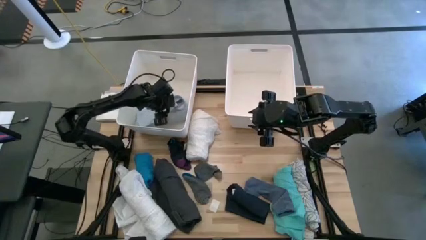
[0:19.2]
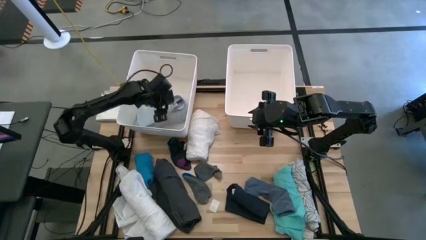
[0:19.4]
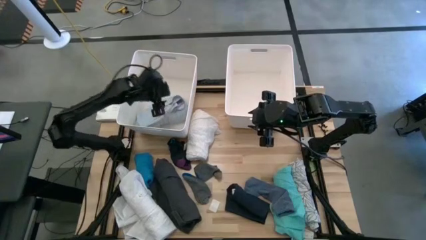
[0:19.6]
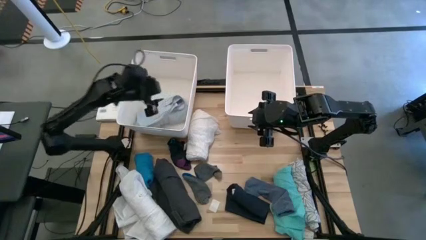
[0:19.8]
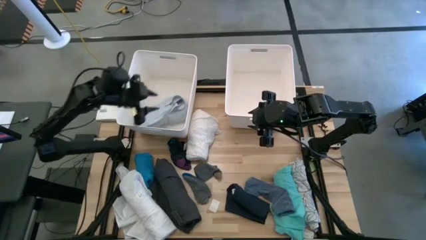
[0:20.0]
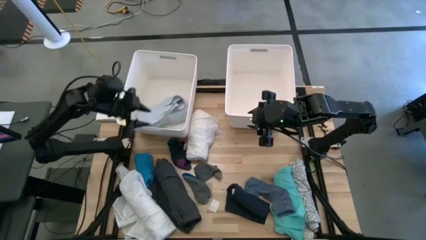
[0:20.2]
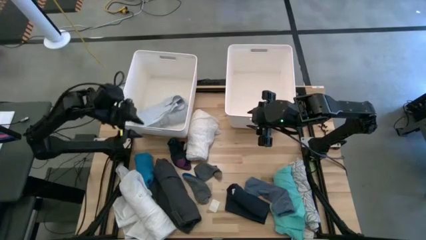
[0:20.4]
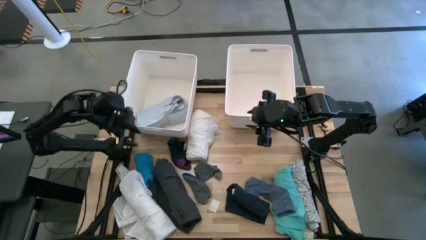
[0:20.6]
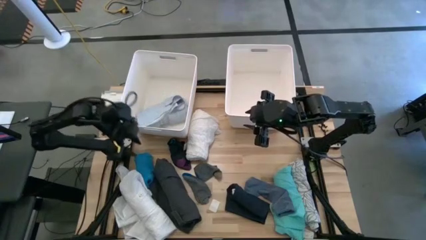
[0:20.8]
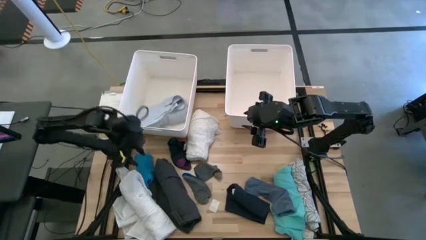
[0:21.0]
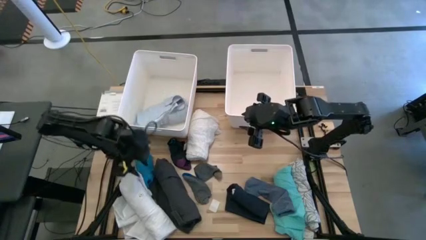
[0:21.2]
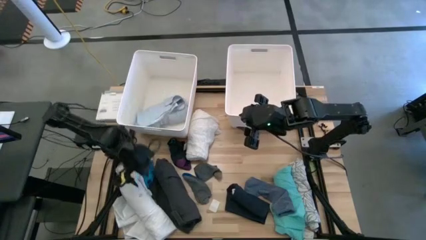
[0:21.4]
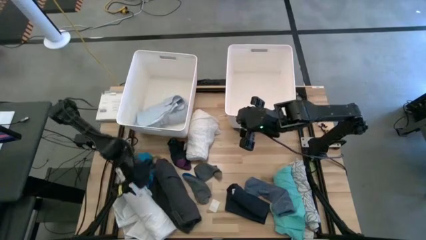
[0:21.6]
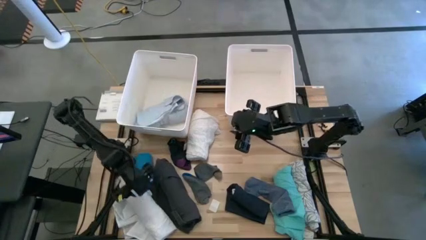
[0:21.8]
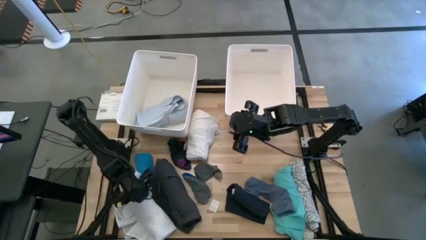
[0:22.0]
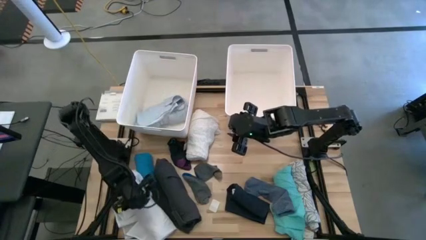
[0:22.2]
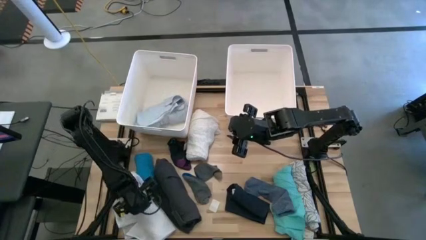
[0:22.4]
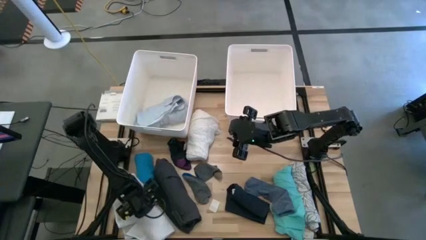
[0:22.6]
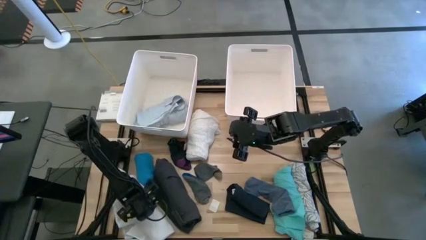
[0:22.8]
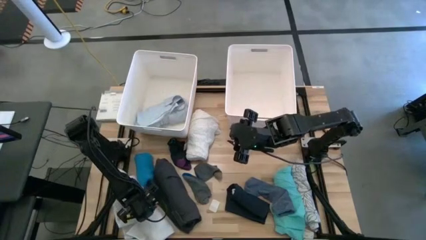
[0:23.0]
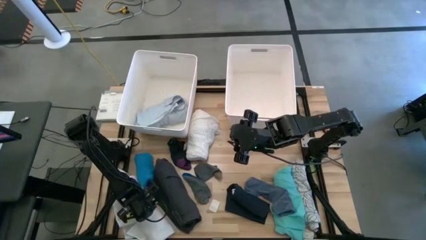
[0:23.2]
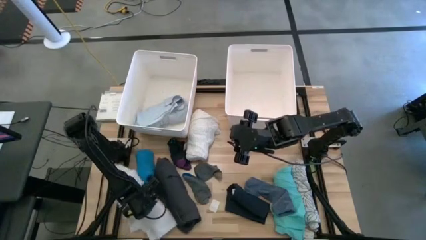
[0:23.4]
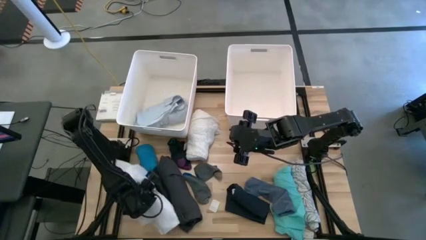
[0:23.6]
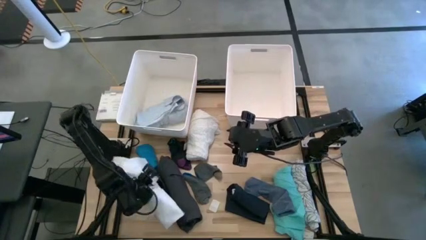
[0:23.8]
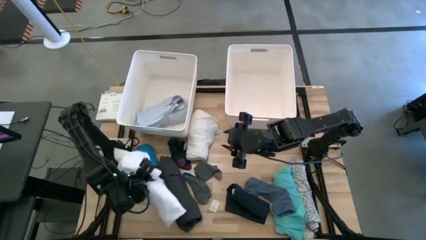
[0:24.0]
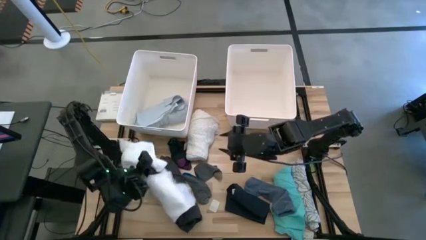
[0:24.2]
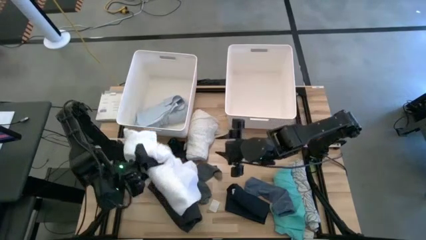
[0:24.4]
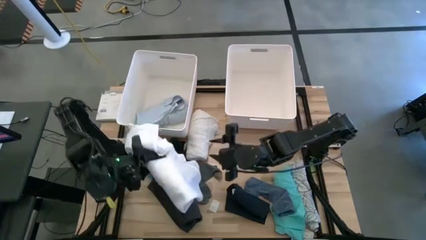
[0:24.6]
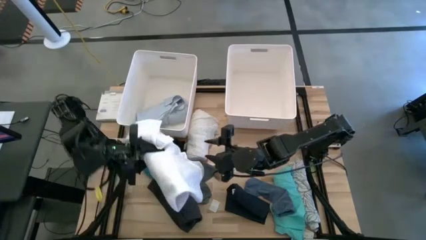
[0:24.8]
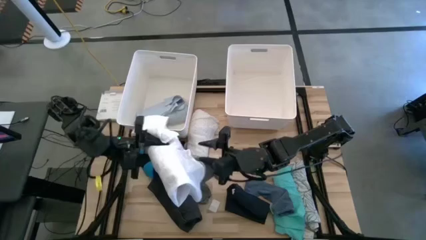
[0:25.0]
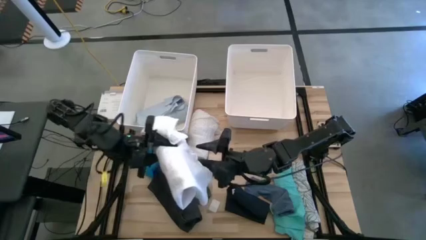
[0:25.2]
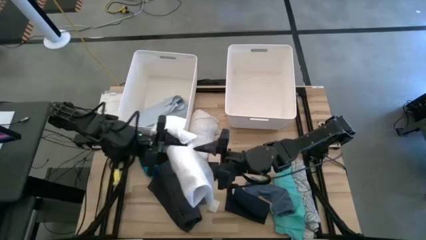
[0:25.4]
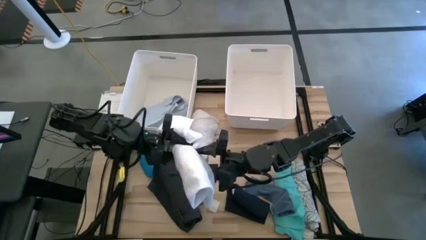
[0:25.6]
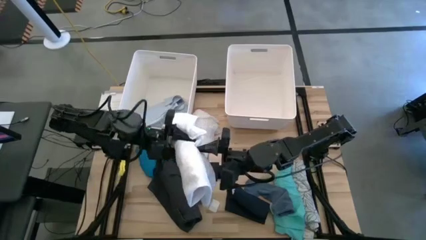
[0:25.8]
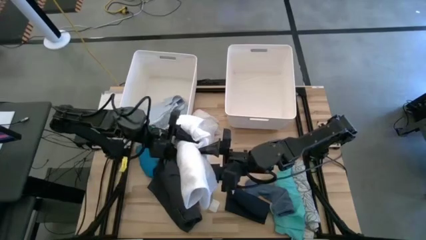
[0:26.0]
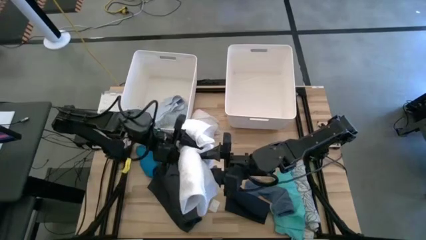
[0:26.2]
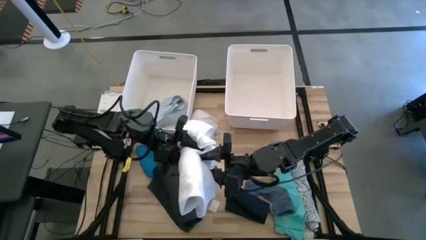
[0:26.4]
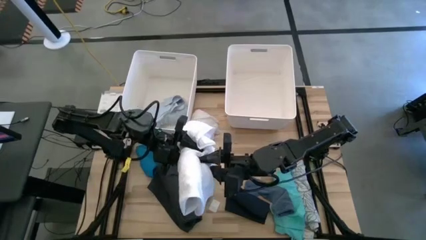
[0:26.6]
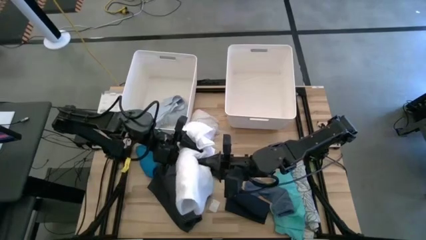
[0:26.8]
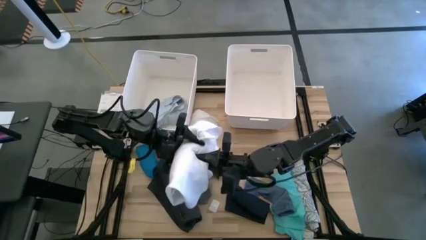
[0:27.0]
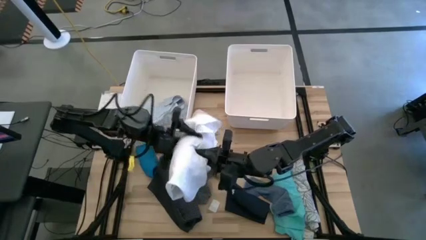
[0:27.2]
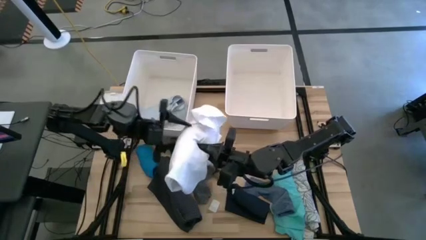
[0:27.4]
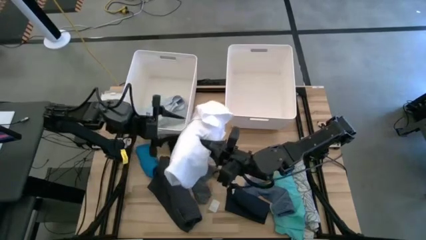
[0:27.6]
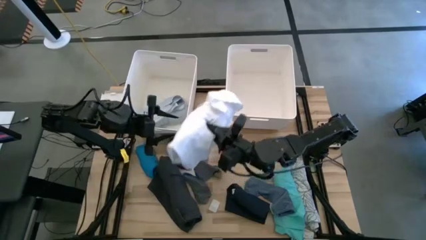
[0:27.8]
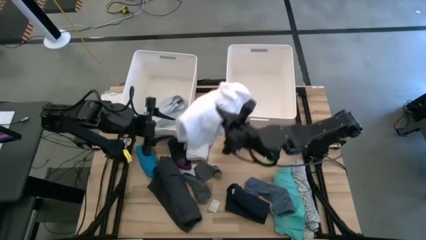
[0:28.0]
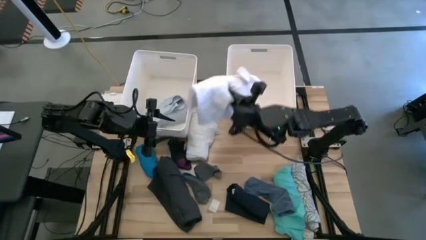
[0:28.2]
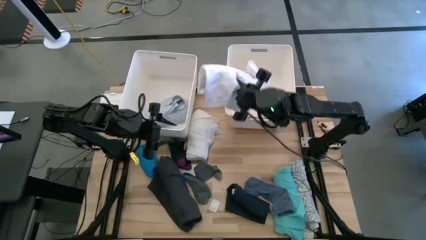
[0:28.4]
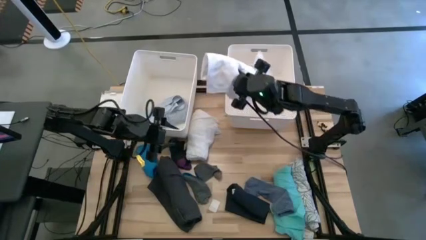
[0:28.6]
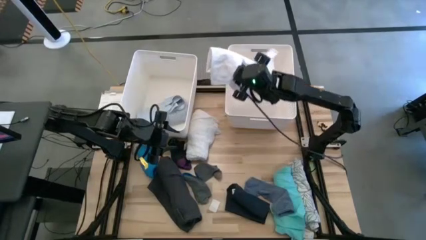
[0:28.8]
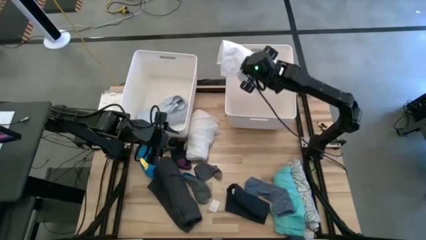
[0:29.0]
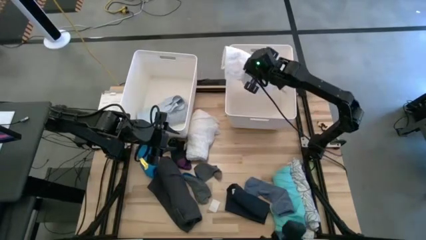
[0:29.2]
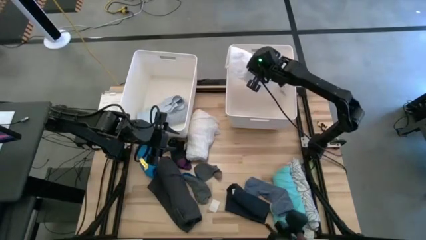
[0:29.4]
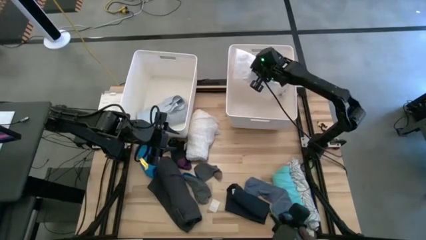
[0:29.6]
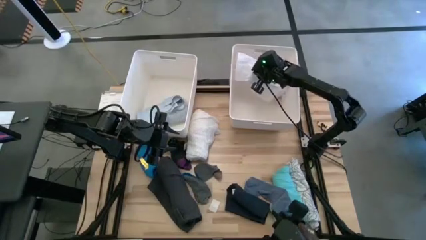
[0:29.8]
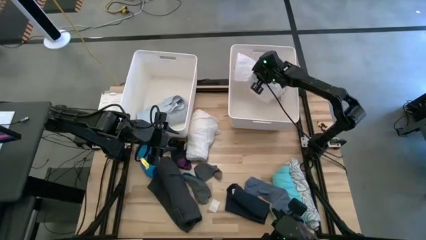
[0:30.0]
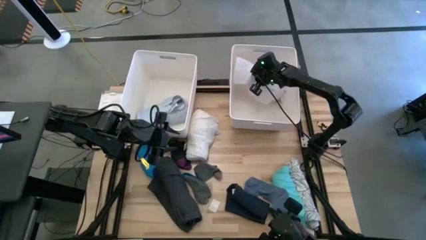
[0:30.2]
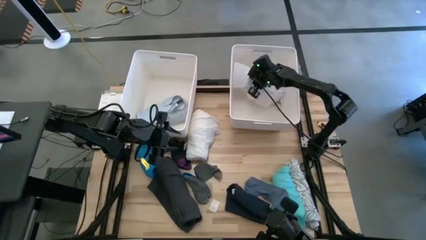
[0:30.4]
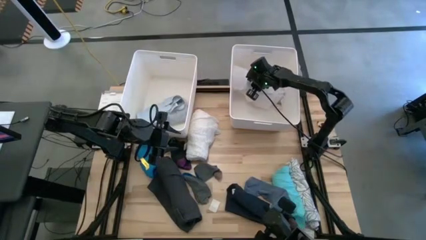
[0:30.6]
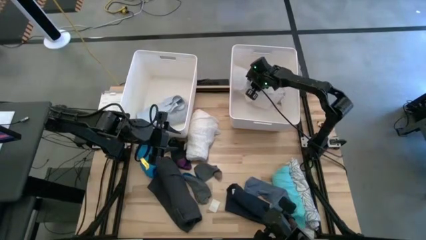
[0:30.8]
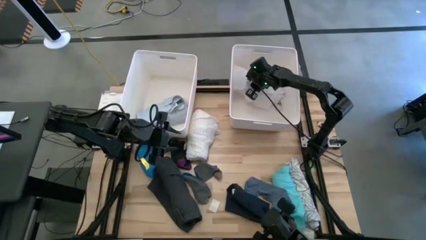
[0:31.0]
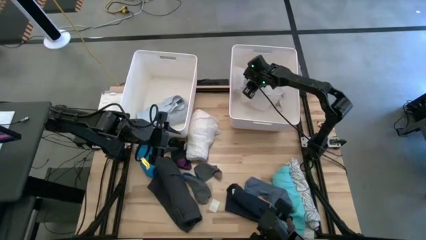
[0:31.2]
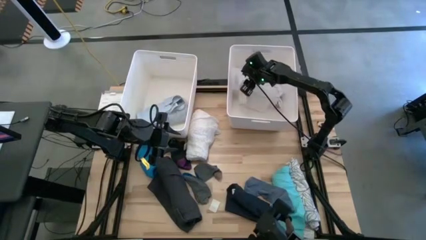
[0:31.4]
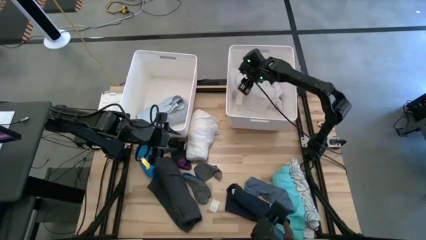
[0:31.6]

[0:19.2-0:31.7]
Task: Sort clothes
Put the white polo shirt into the right white bin
